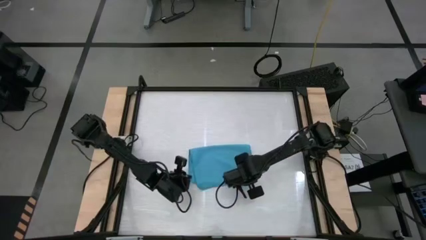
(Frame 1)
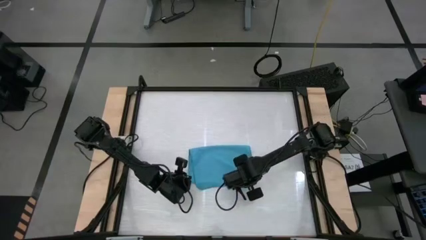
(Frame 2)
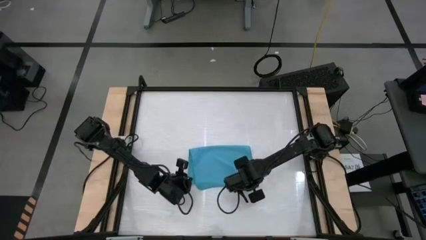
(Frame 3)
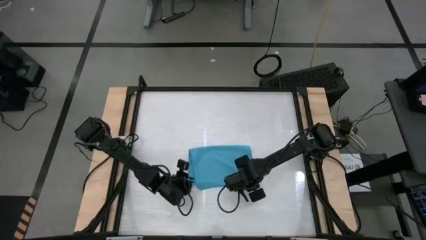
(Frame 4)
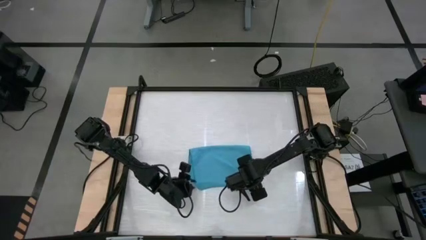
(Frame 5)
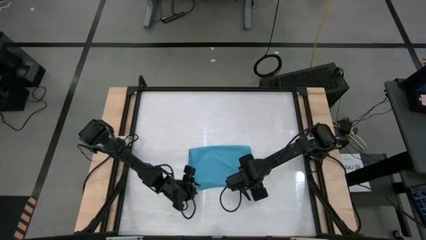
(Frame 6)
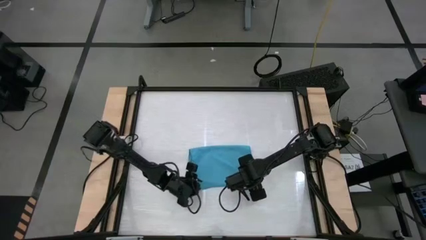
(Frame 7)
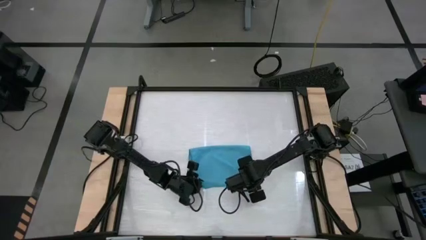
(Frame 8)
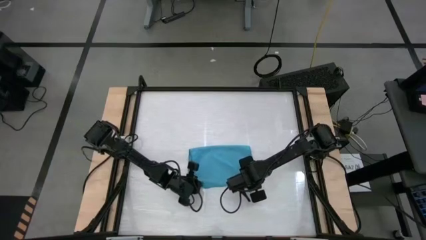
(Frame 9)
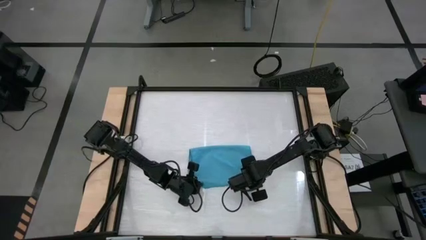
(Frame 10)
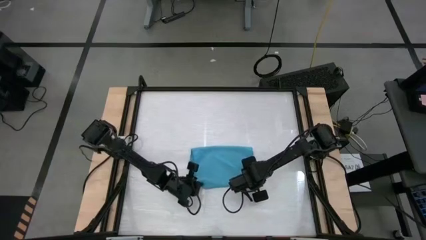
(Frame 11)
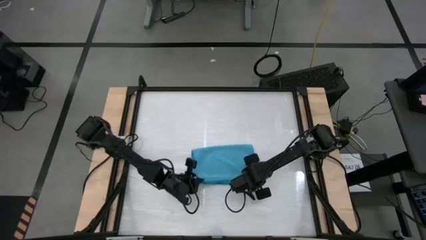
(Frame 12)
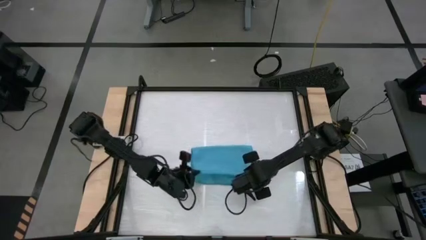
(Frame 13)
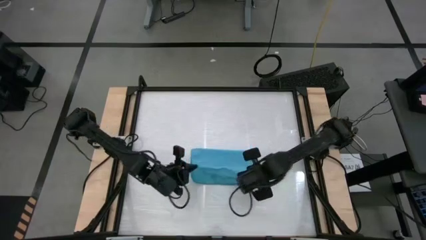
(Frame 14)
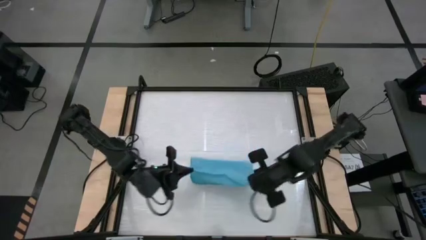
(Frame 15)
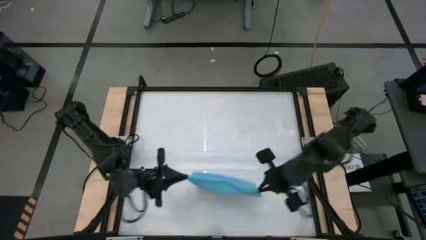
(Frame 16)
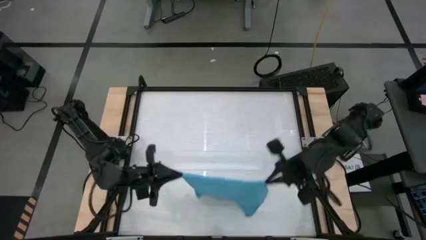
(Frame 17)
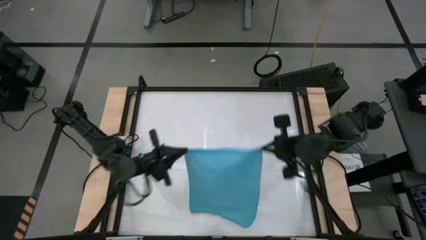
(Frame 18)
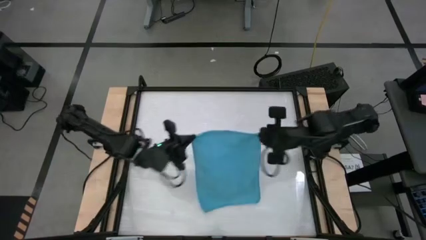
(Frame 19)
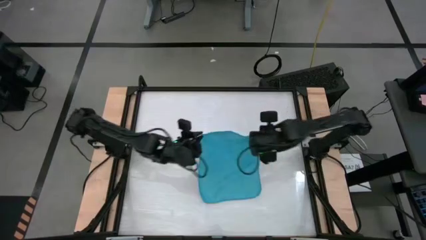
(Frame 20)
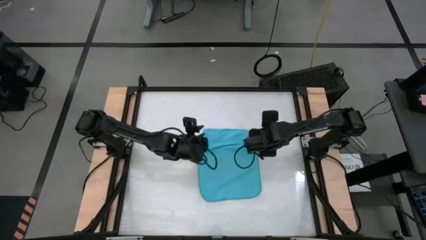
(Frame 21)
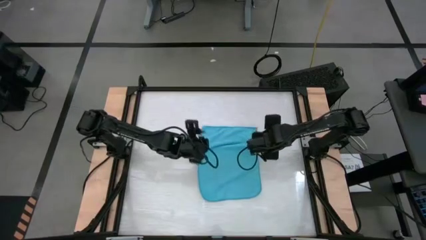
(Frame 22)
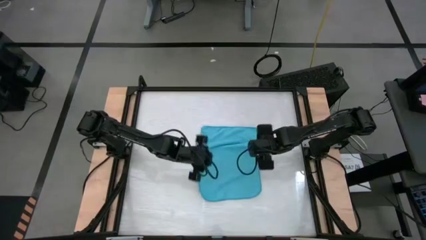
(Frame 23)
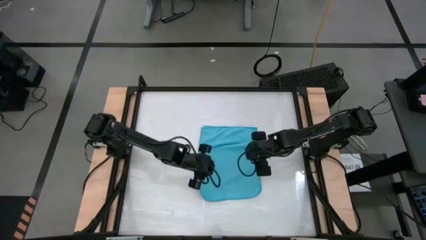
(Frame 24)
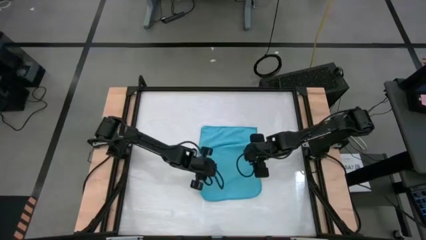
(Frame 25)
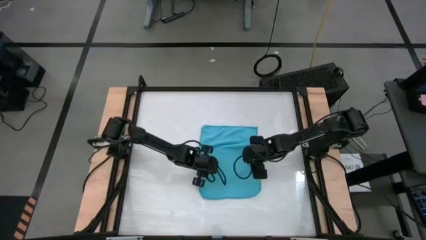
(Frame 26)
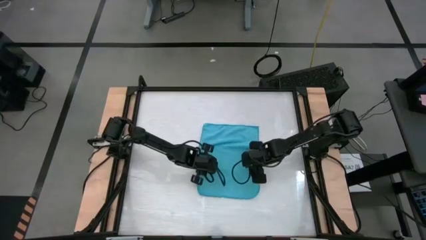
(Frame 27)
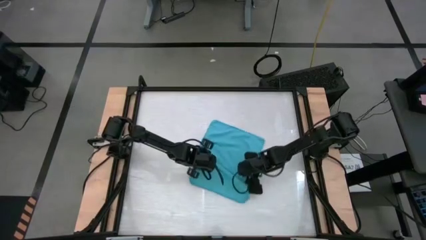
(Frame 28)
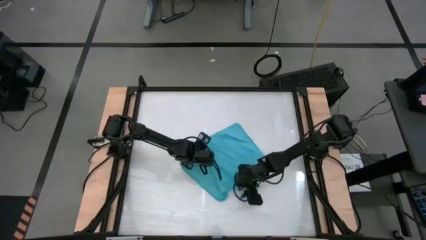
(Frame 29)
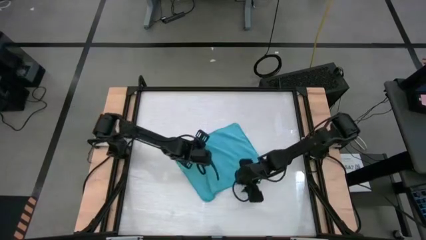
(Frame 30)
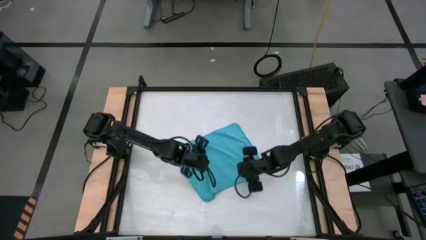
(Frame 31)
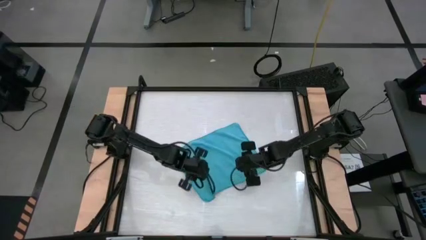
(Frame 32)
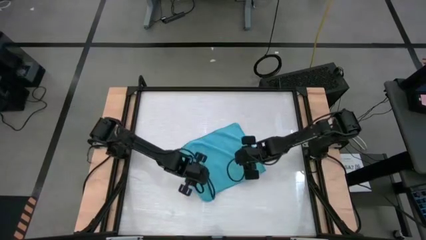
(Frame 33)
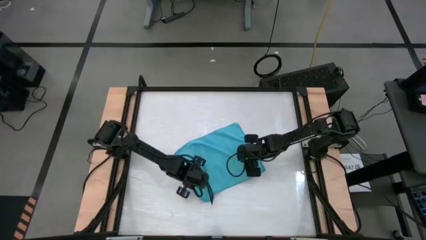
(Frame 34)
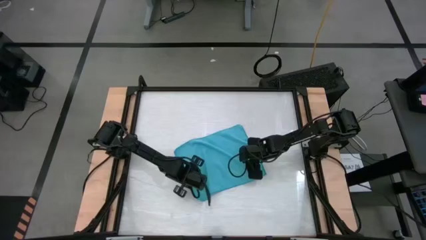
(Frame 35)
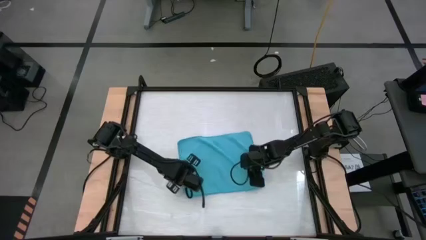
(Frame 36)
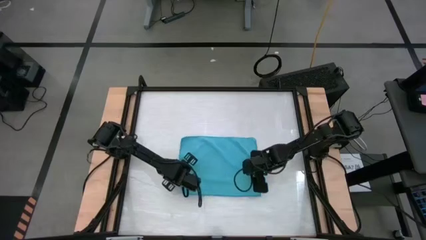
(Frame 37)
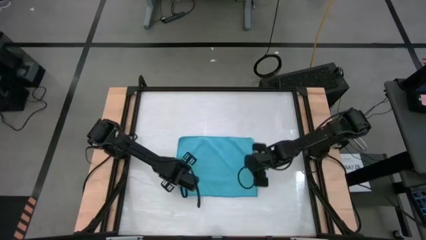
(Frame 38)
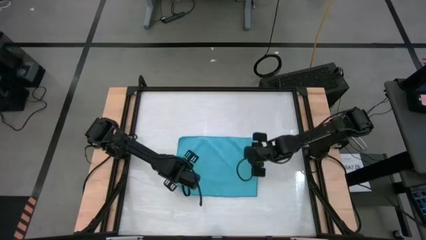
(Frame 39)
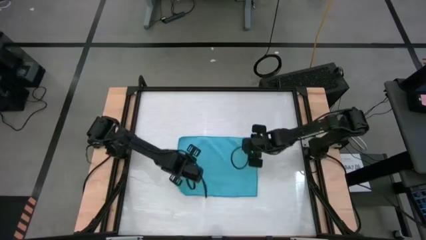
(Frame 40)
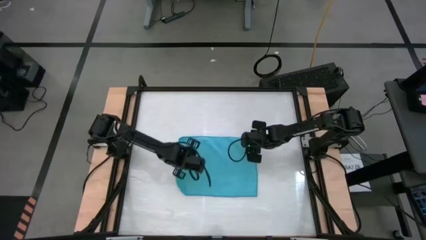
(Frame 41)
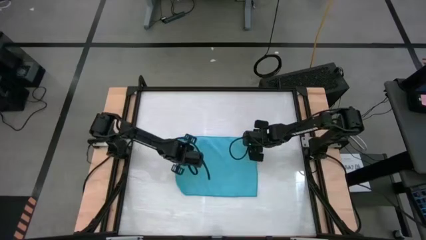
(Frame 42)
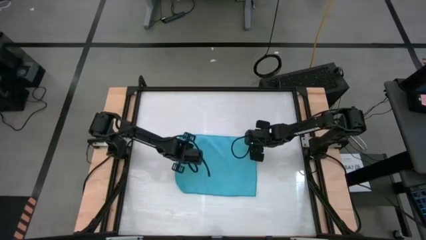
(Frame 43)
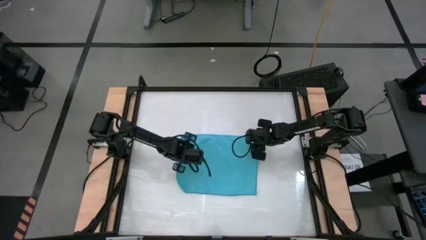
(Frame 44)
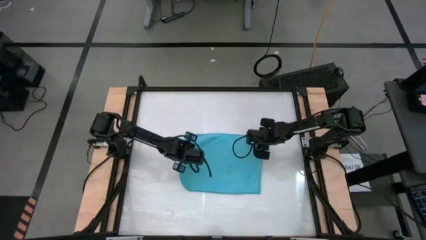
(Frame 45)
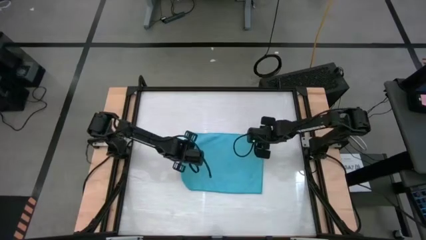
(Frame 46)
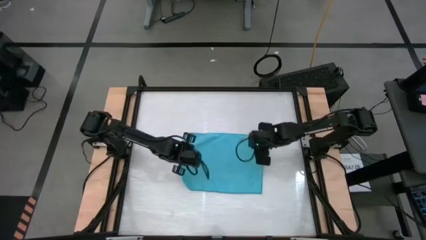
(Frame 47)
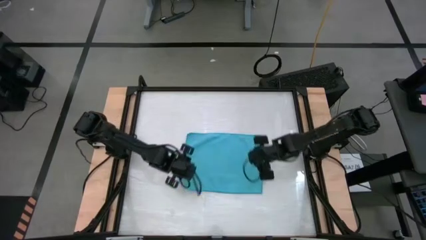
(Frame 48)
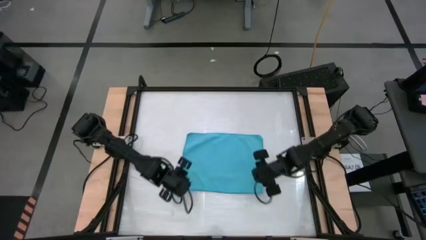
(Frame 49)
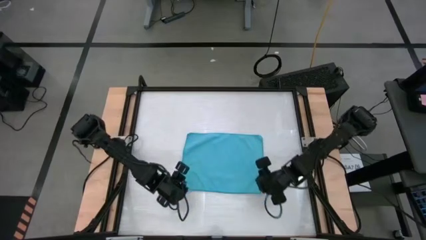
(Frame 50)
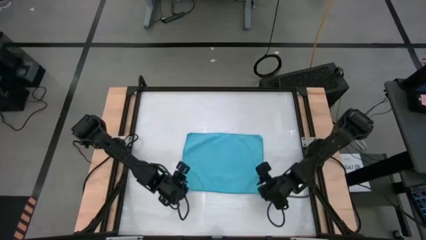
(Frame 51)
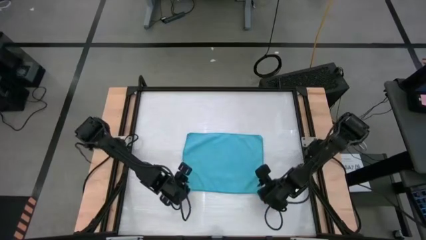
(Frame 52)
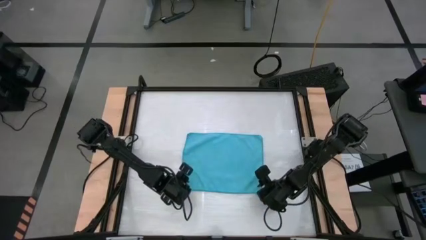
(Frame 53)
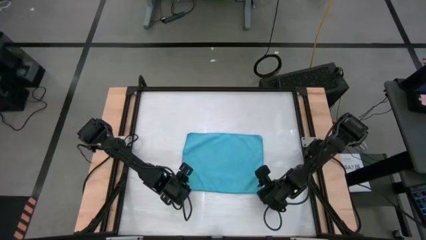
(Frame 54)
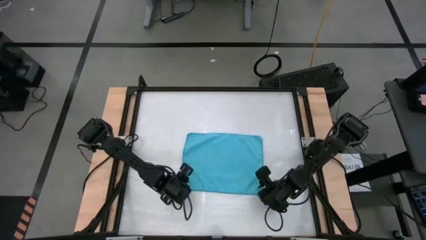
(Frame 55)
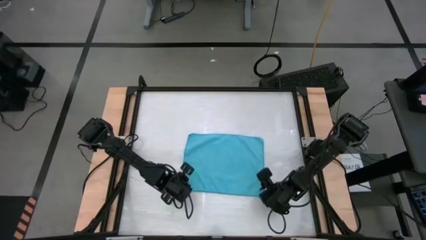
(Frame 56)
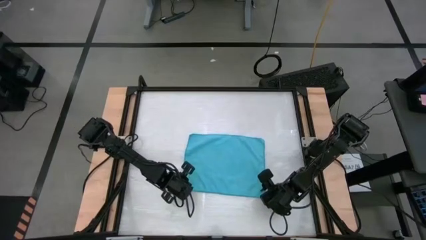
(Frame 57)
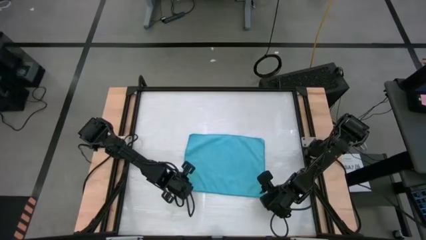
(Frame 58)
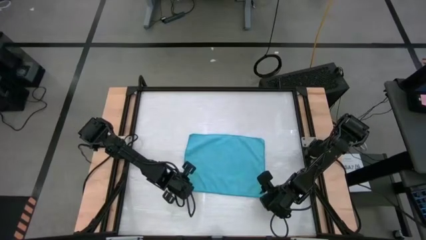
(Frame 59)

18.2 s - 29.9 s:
Task: Roll towel
Fold the blue towel

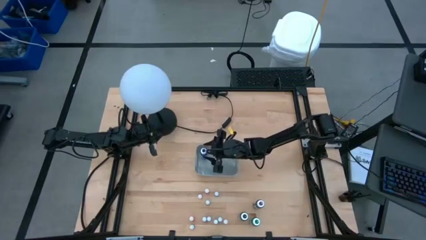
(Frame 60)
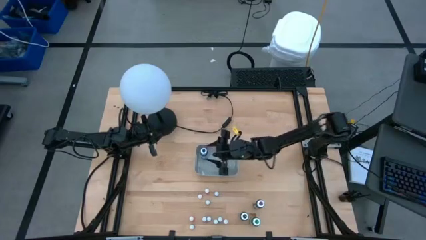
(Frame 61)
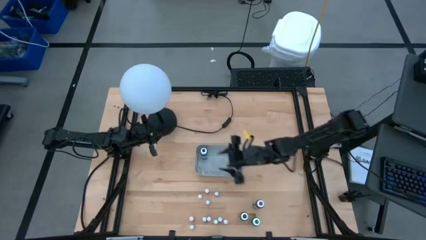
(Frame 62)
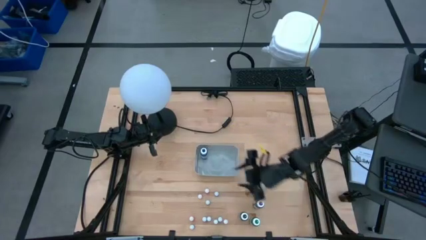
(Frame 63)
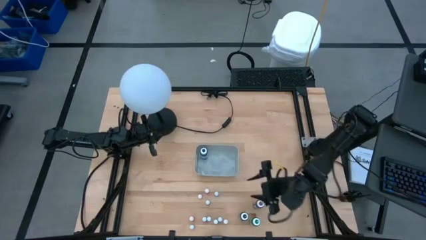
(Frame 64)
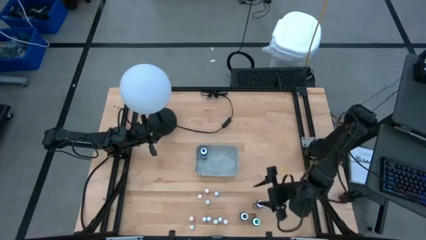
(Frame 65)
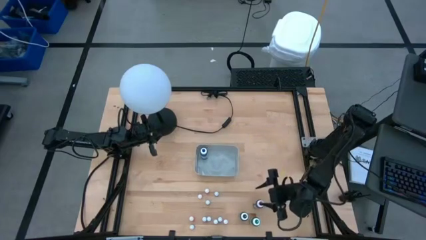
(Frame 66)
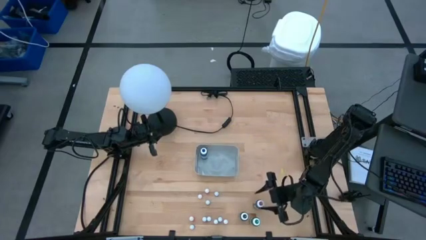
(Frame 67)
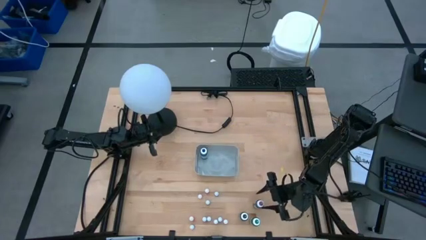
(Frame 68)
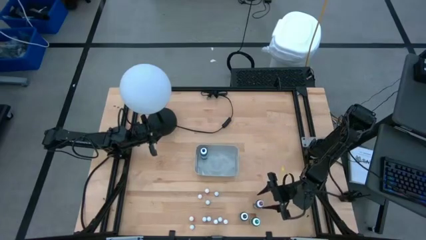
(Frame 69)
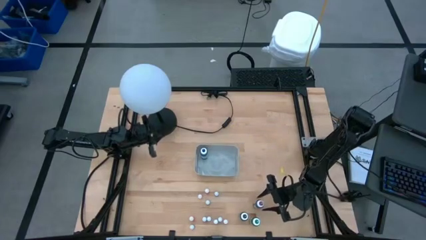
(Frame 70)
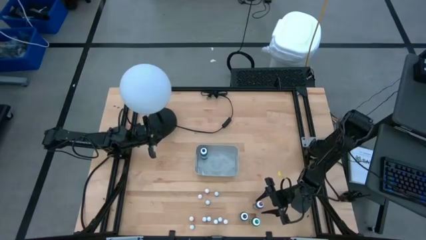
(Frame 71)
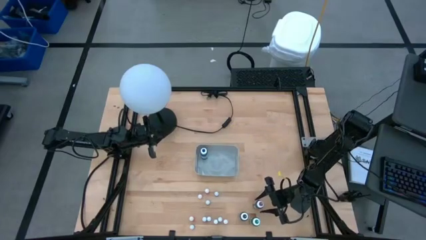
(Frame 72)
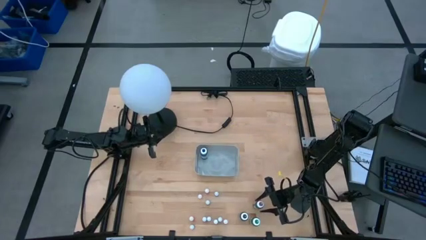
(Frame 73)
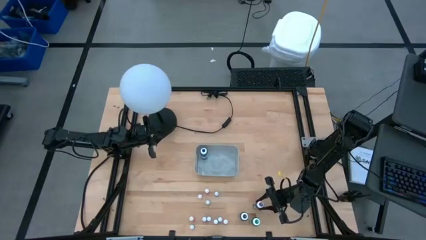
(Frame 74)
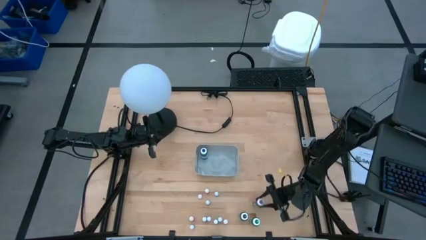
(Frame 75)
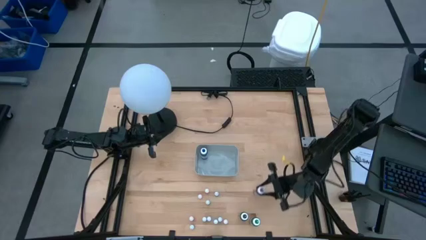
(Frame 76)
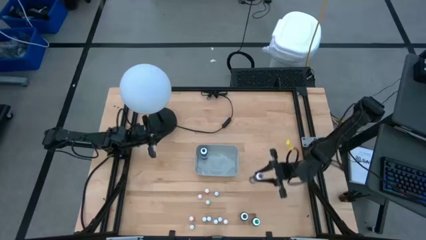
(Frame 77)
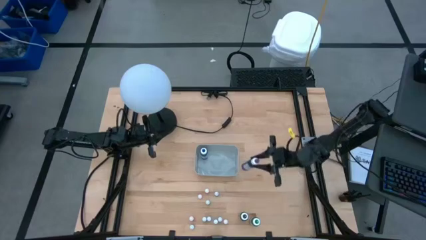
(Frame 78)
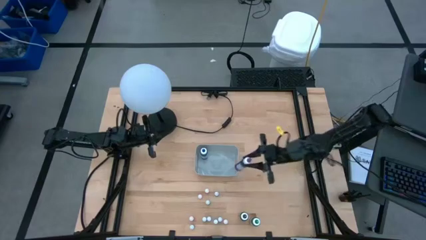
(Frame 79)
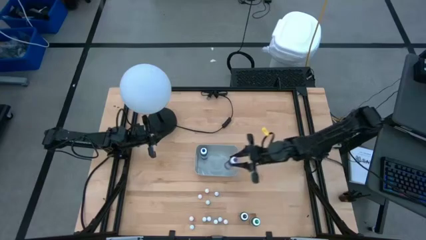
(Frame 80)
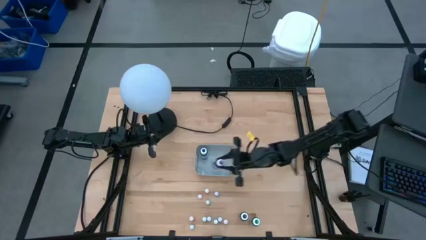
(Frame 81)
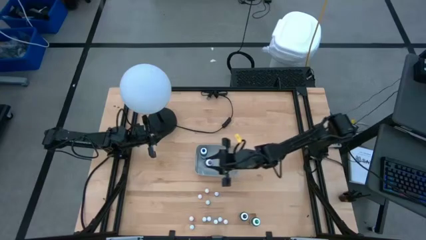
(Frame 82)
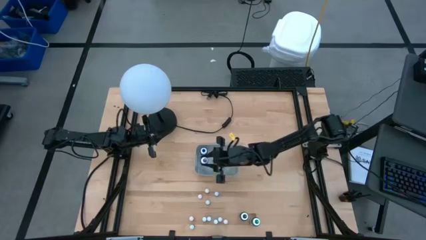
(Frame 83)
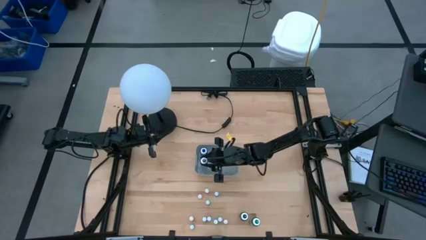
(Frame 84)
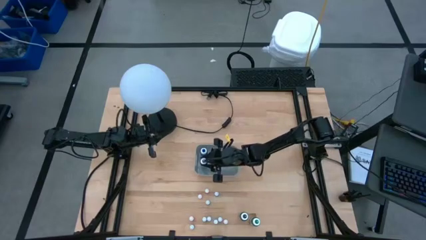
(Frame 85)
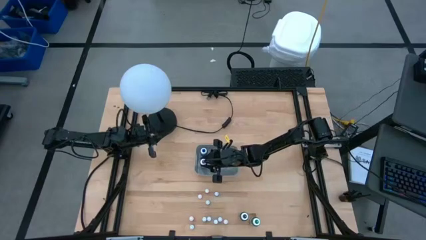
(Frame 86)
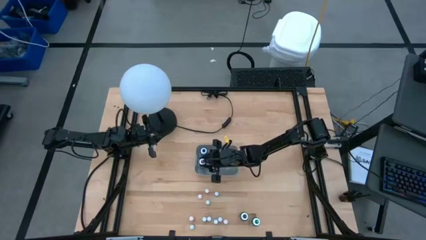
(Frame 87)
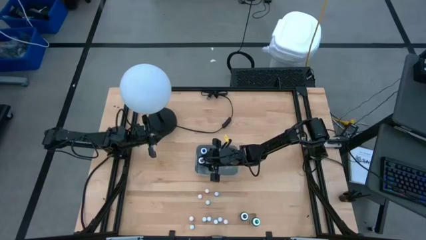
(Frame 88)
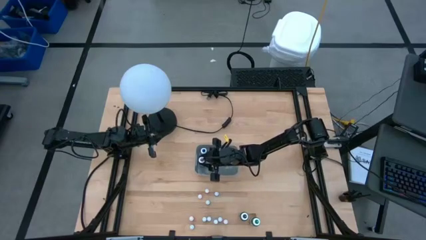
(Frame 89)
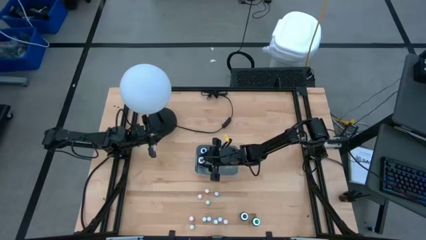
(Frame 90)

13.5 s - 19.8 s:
Task: Pick & Place food coloring
Put the big purple food coloring bottle into the gray bin
